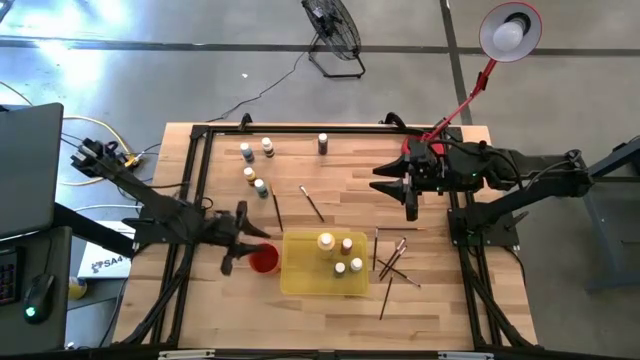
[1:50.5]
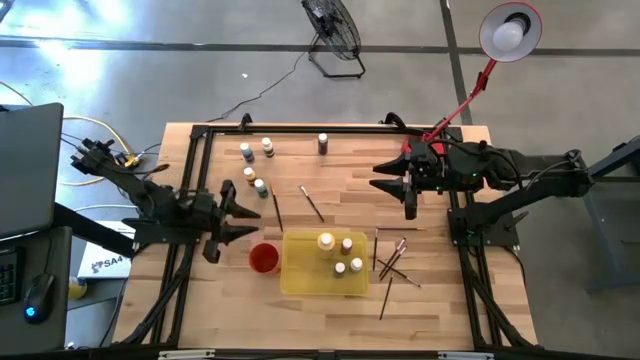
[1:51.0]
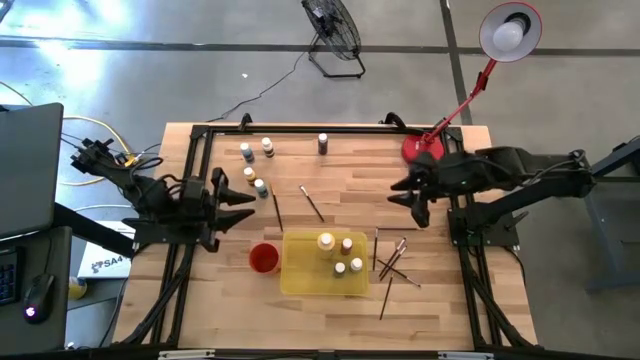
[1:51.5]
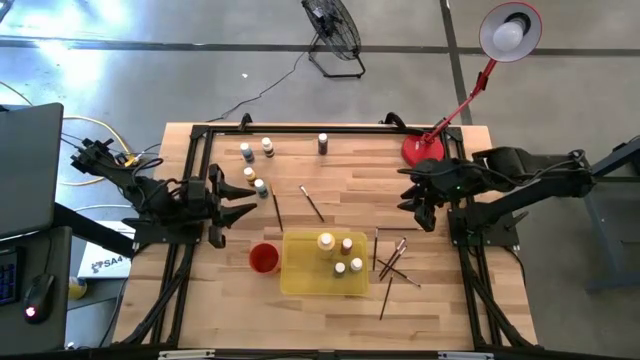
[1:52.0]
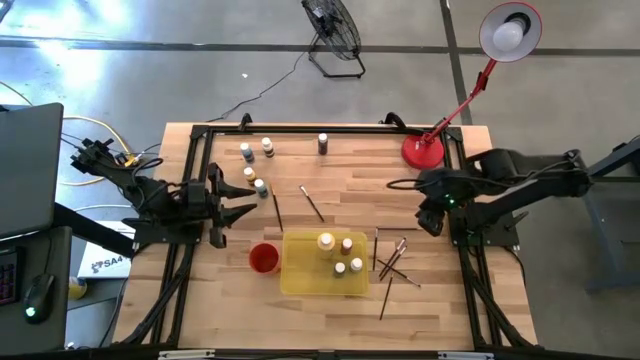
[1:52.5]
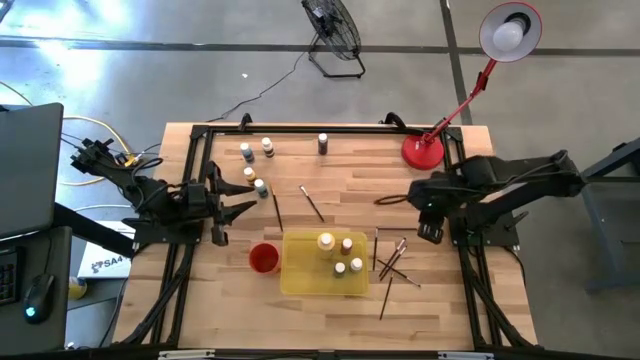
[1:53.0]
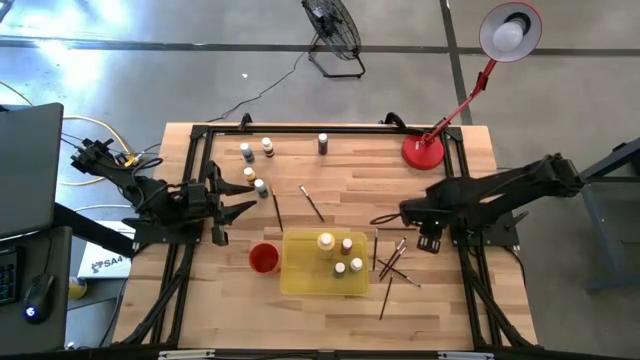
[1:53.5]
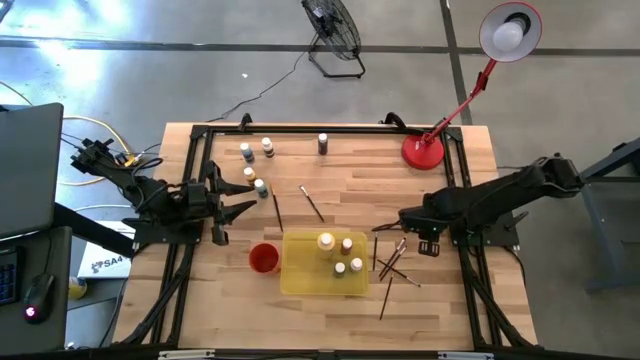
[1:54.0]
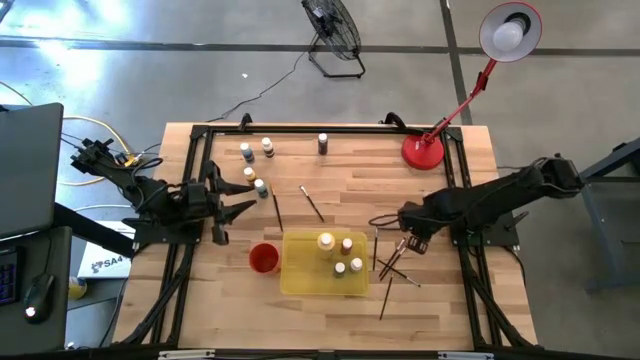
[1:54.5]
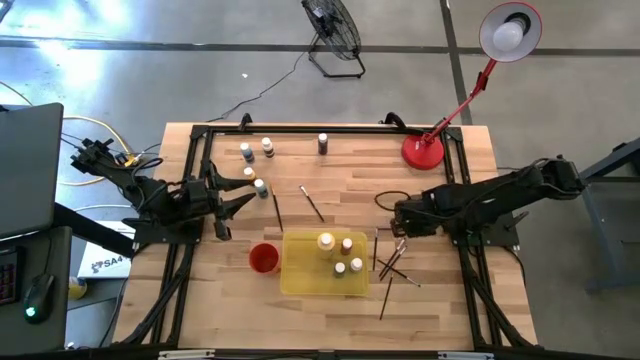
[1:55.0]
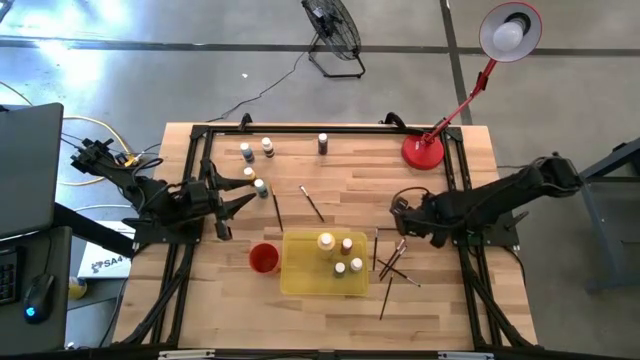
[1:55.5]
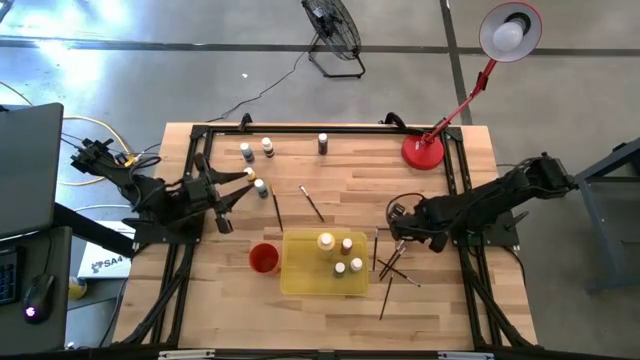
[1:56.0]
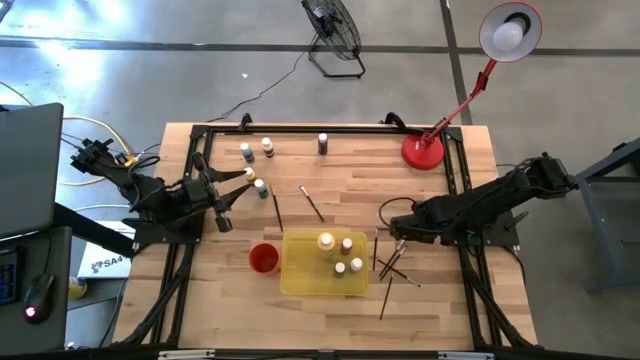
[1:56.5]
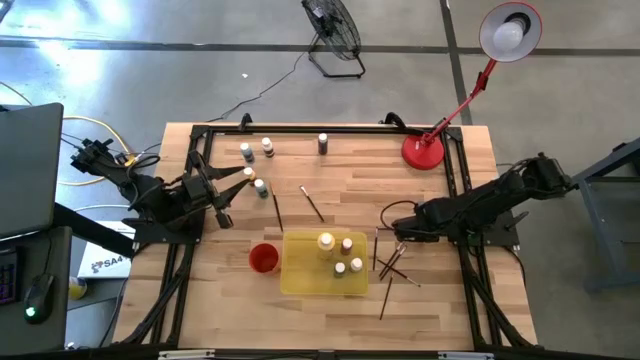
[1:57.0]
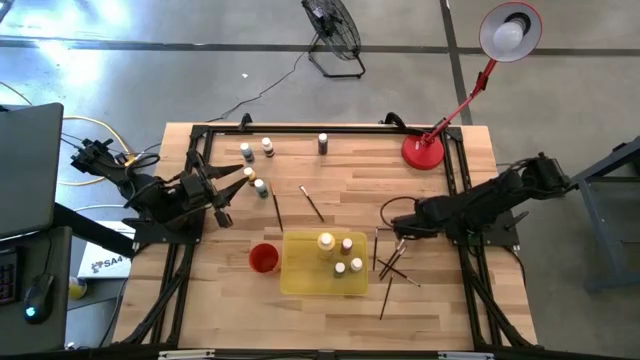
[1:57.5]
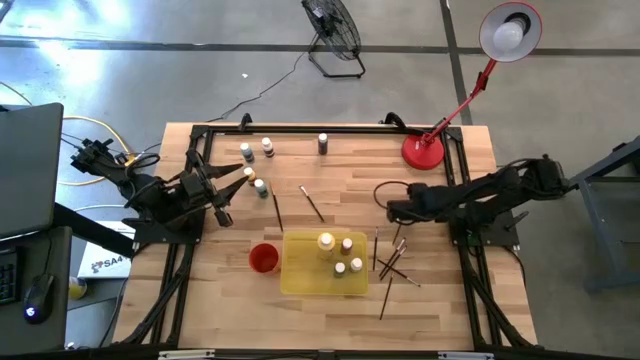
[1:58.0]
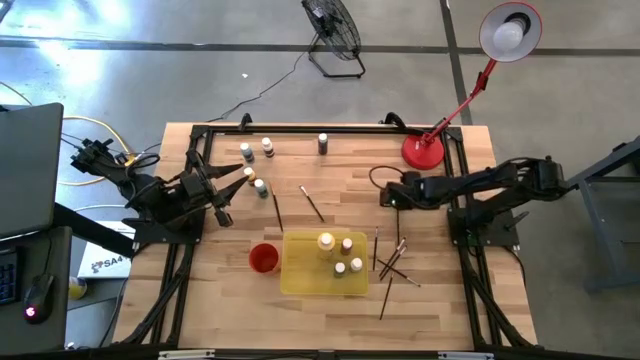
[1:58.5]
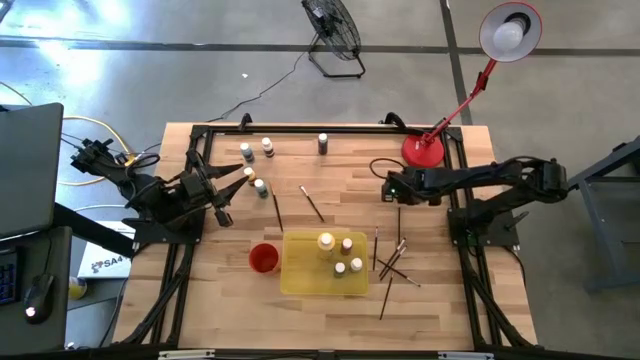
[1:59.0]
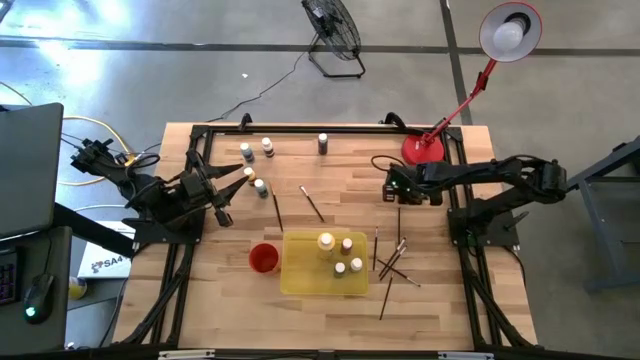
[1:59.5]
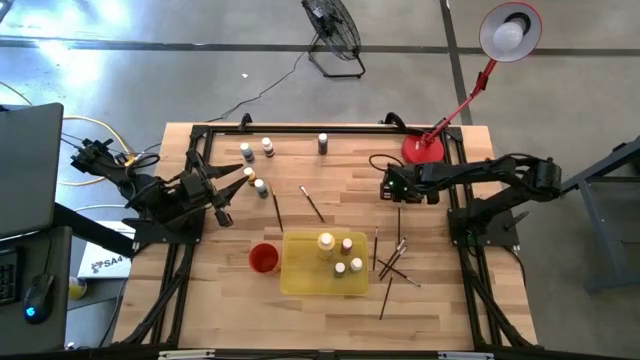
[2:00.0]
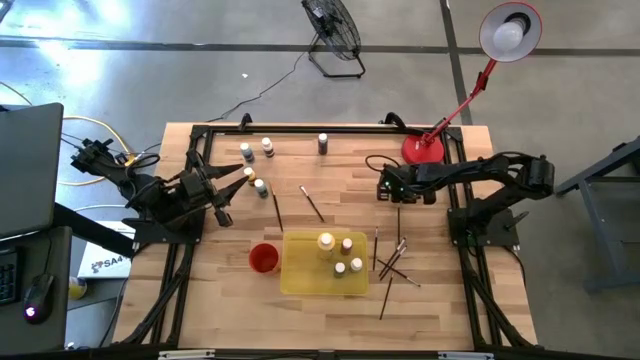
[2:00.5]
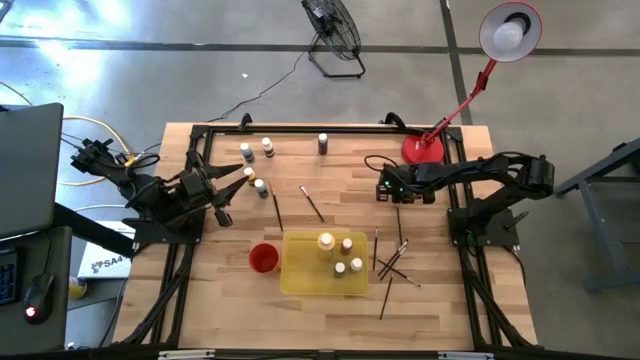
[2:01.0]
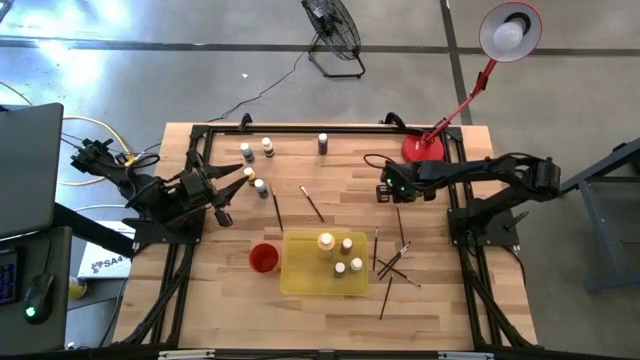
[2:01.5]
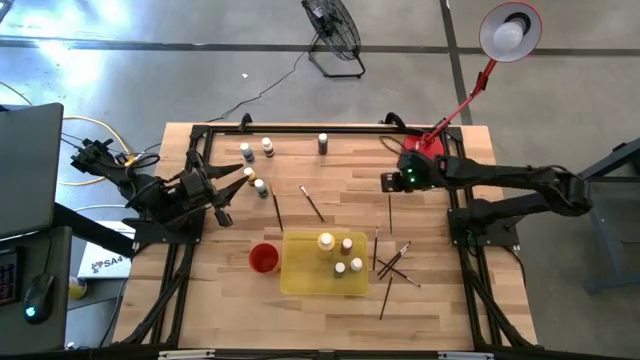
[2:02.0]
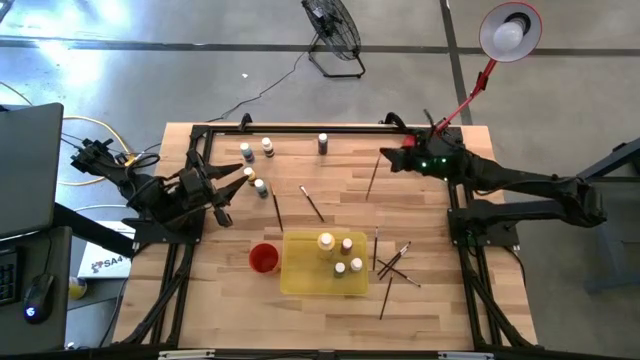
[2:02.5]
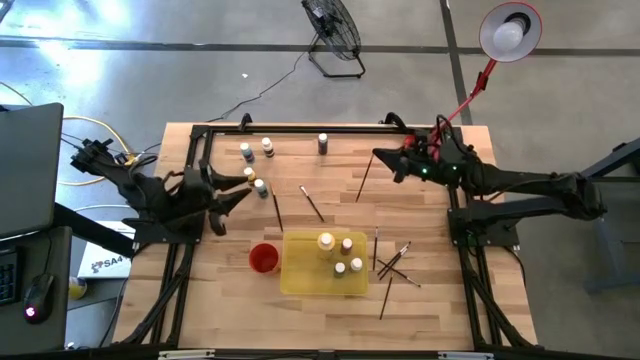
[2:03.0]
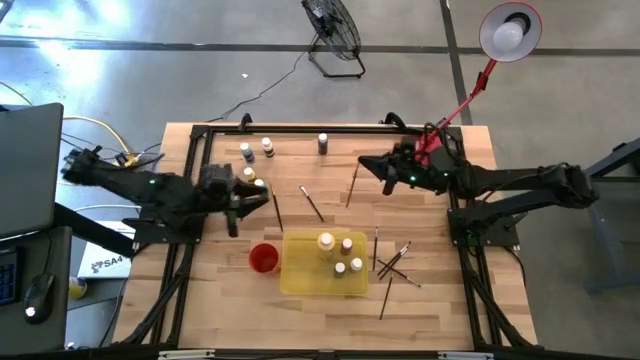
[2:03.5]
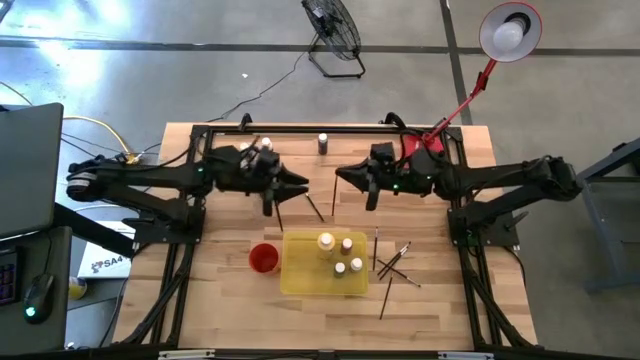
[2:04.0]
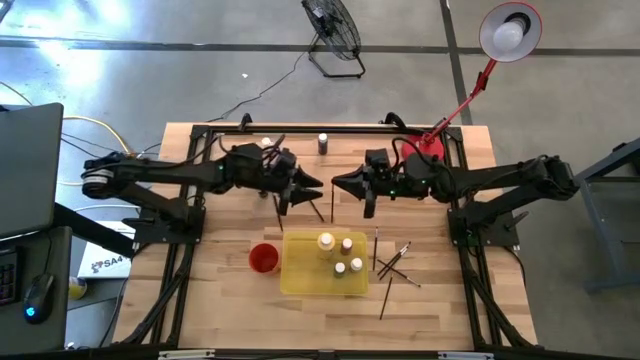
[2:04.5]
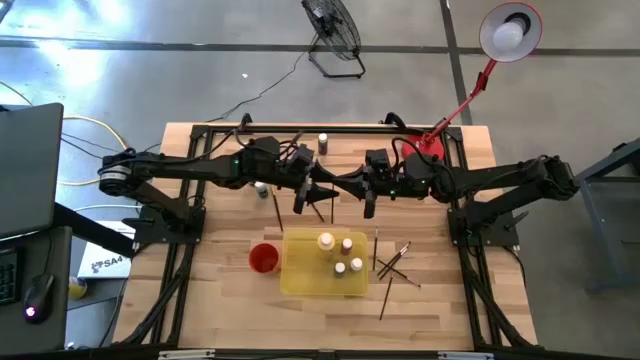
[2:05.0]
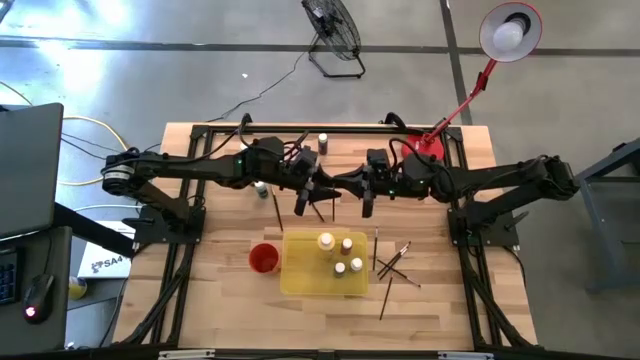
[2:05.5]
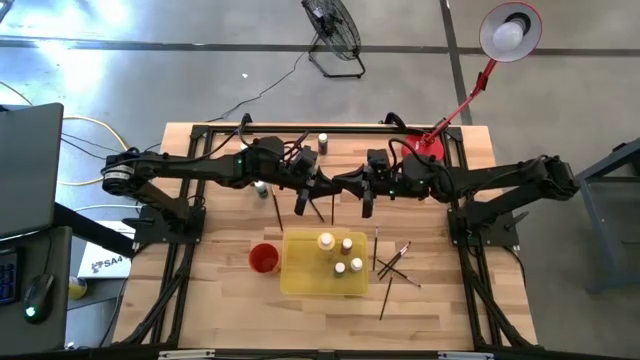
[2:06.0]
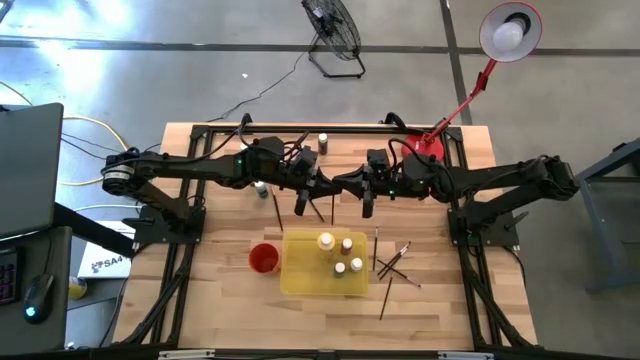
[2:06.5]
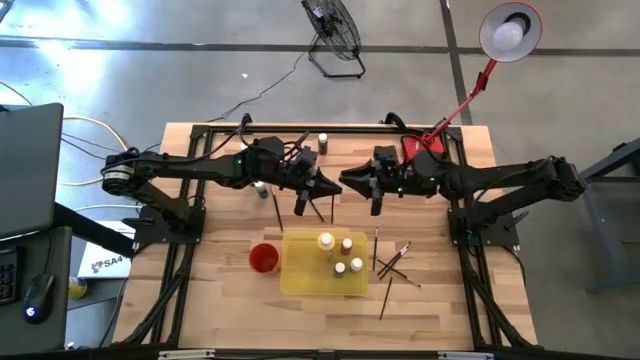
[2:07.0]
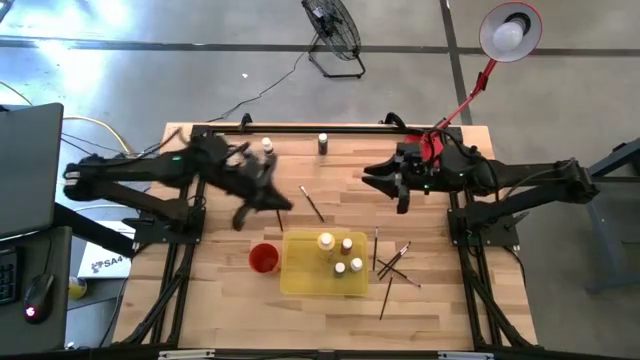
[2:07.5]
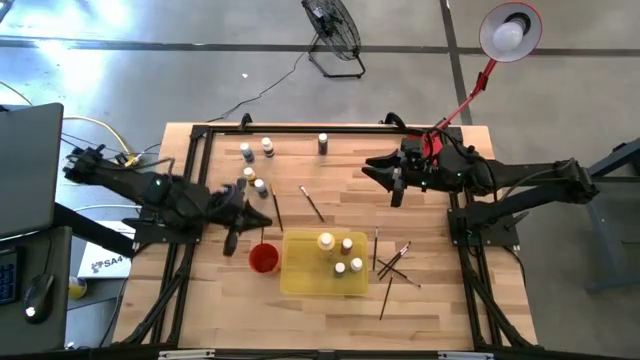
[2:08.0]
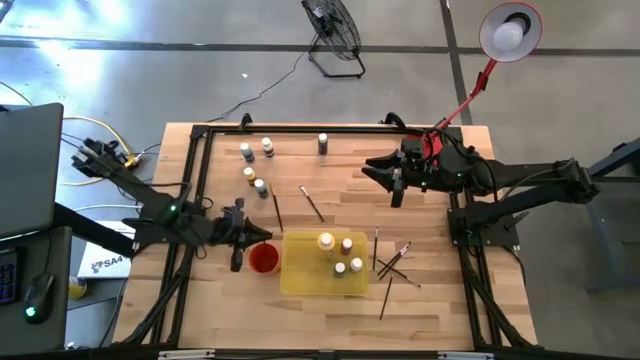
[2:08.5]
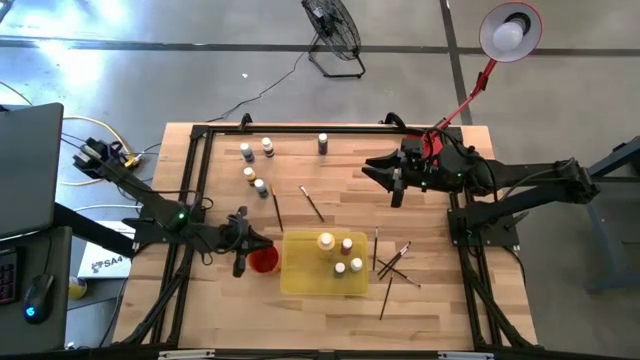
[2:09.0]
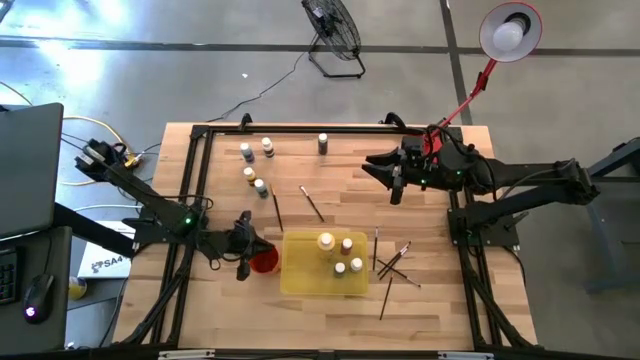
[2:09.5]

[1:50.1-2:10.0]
Task: Pick & Place Paint Supplies
Put the golden paintbrush into the orange cup
